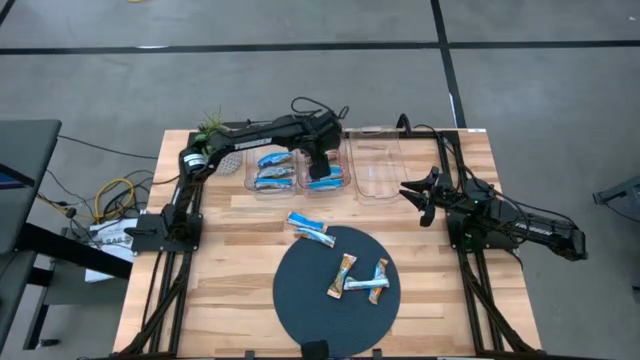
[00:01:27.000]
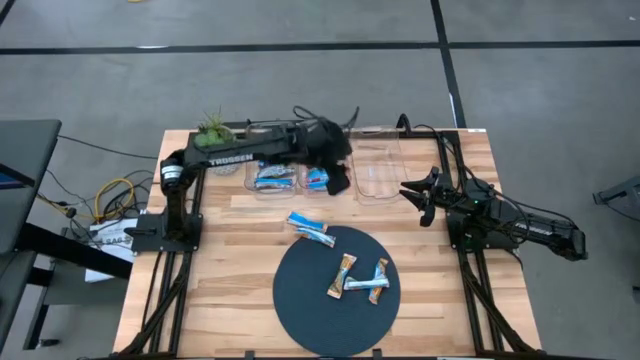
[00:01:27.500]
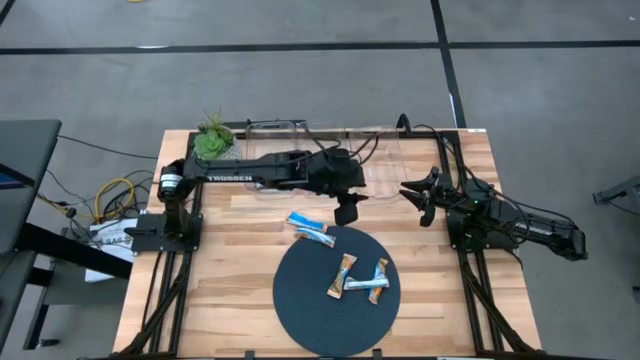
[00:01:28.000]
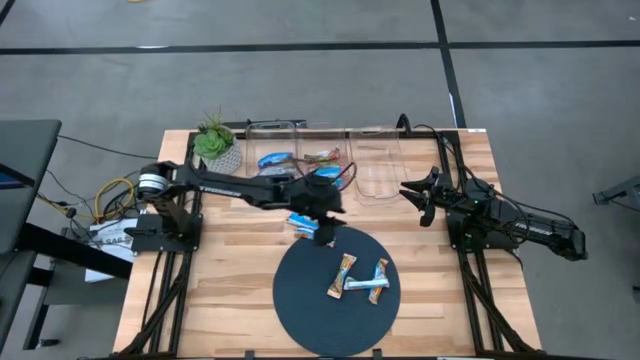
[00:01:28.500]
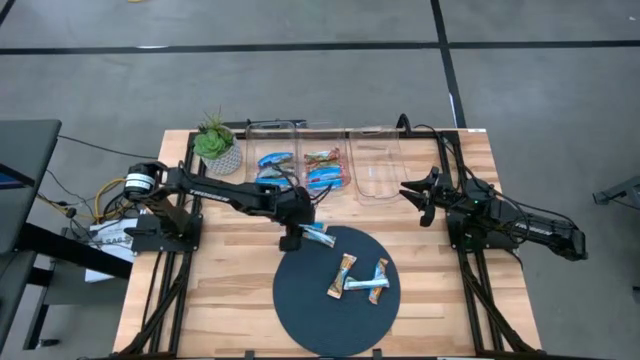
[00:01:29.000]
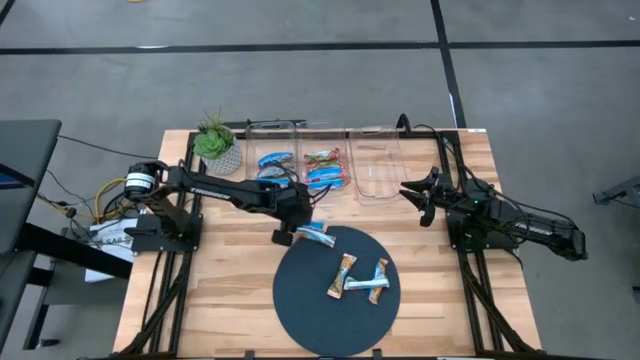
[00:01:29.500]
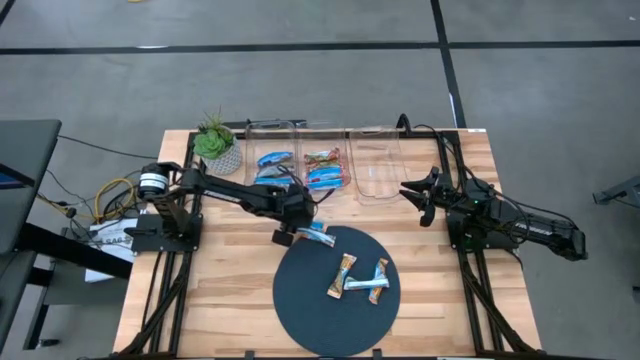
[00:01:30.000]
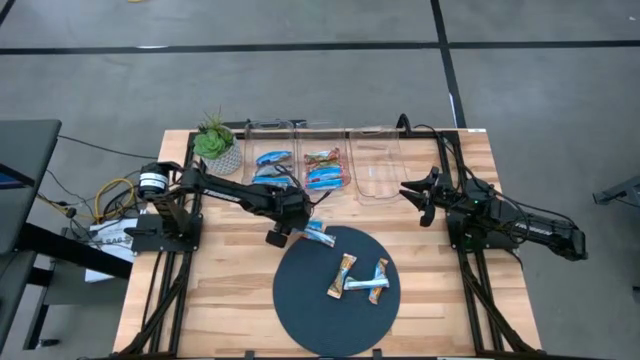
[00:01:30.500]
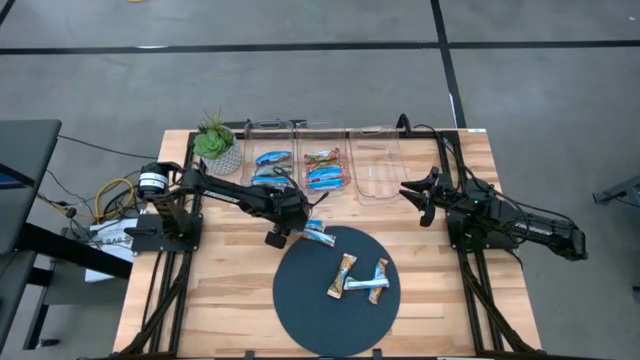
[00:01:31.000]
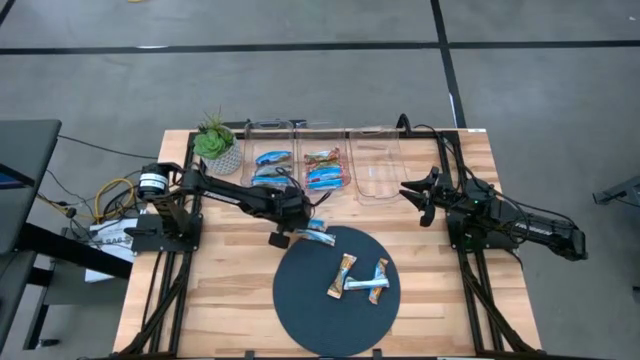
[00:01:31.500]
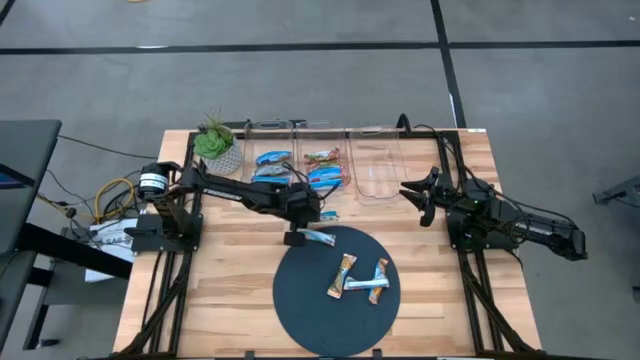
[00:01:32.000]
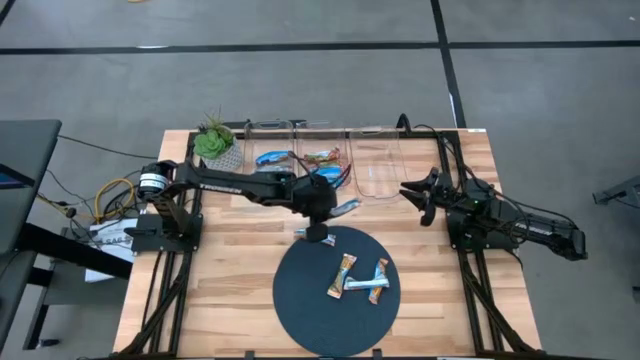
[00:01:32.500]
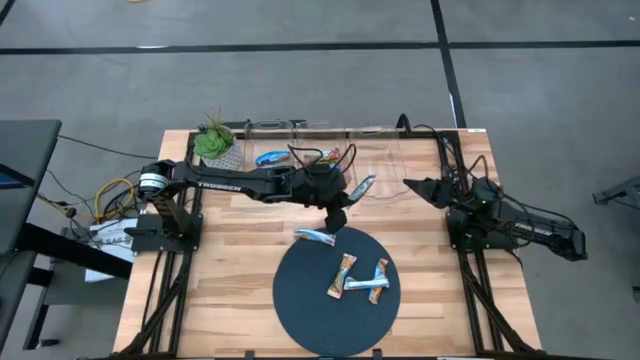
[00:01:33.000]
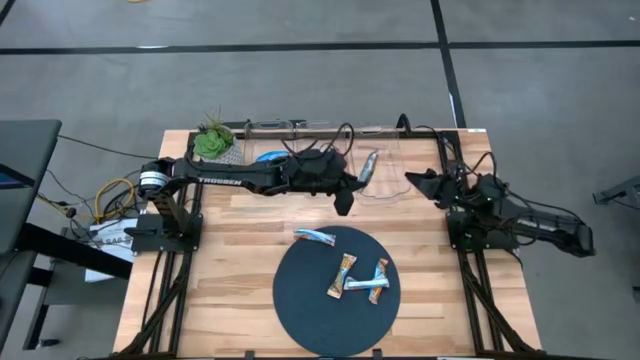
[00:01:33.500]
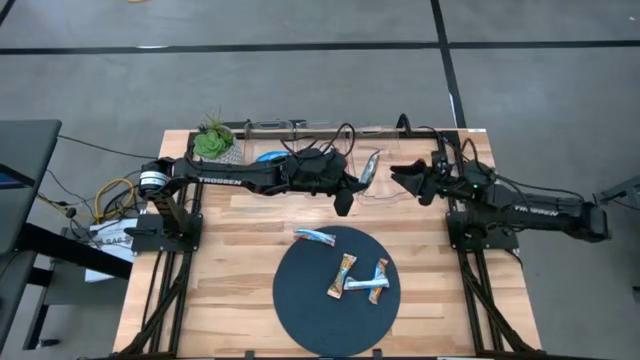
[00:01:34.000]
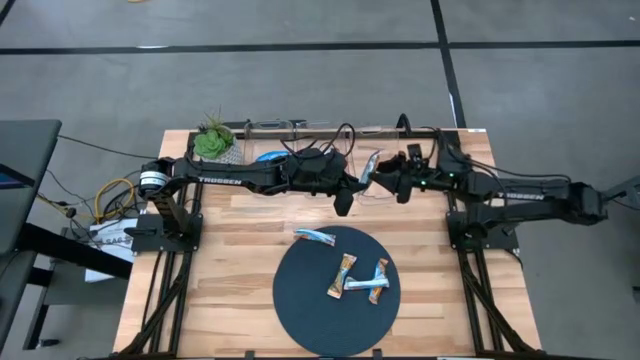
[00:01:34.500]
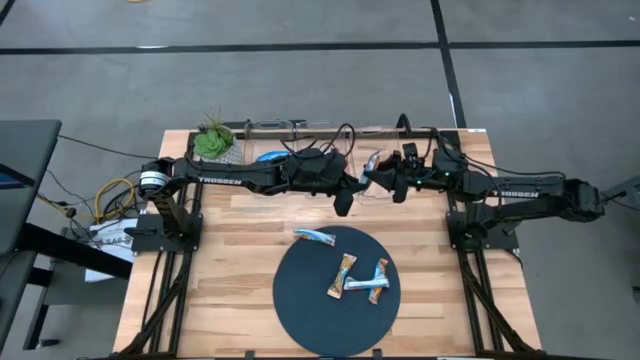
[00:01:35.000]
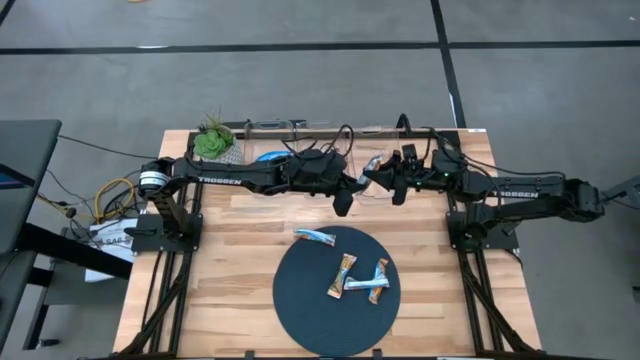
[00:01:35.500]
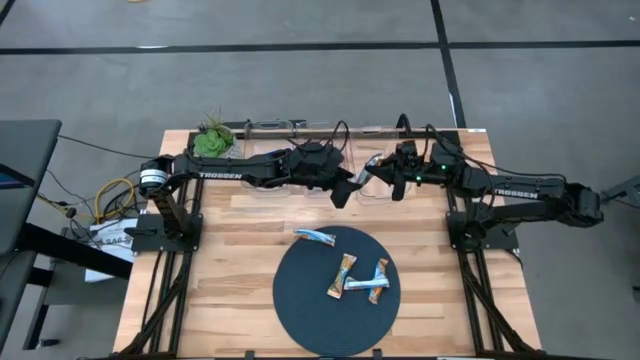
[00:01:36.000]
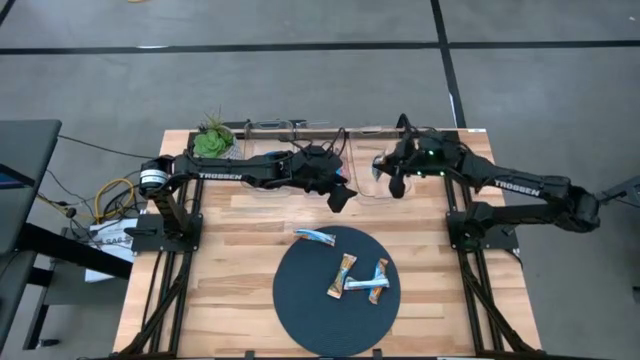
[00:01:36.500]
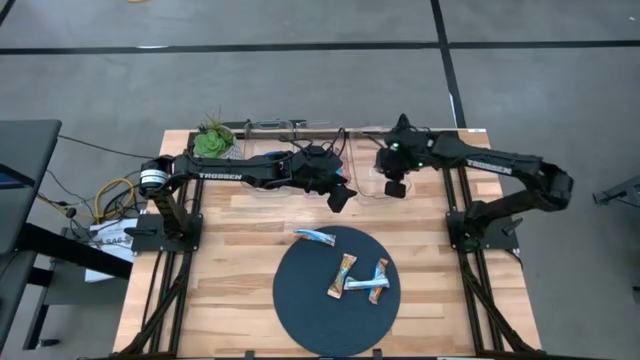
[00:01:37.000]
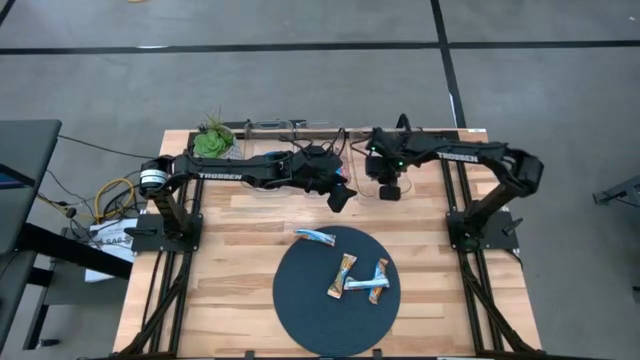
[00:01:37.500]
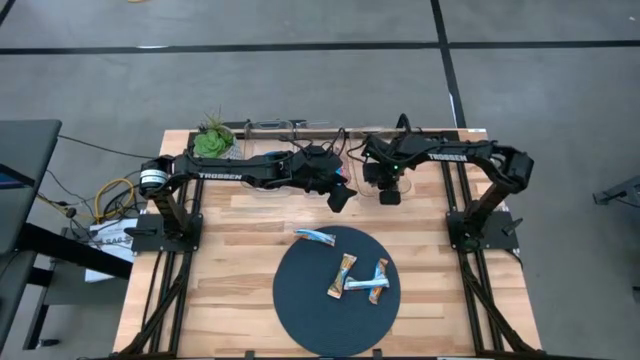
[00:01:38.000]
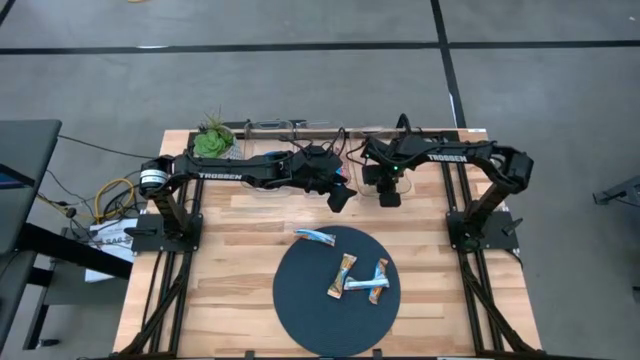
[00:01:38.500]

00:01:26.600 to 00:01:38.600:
Task: Pick and place Granola Bars by type
Put the yellow granola bar into the right transparent bin

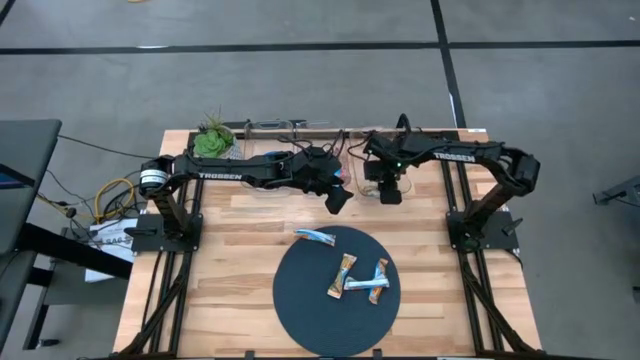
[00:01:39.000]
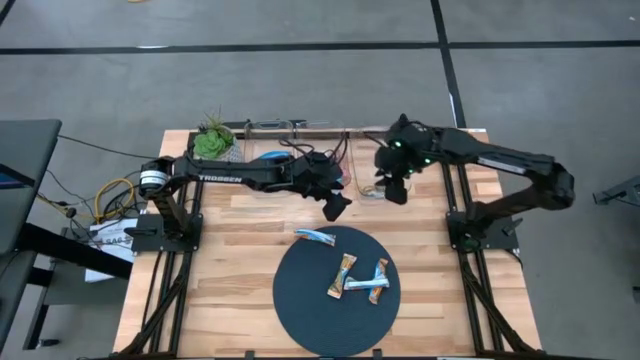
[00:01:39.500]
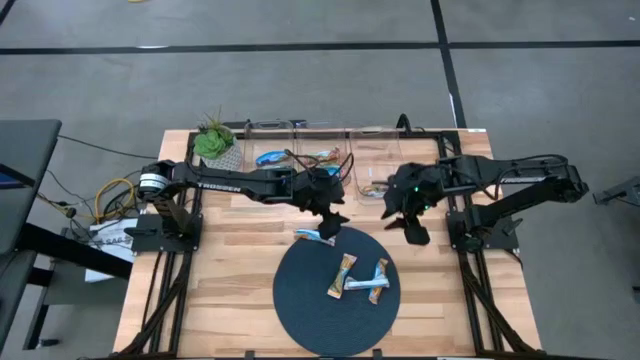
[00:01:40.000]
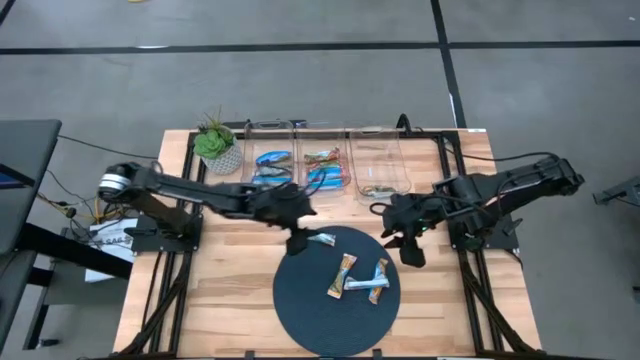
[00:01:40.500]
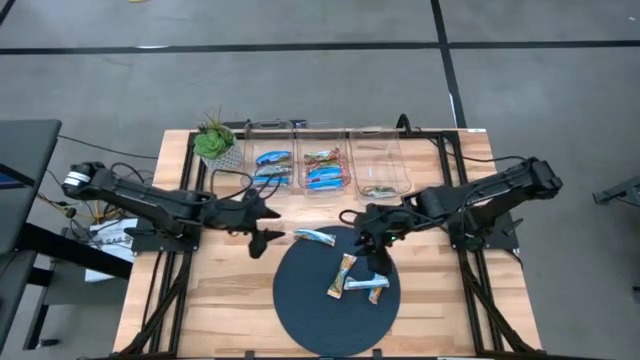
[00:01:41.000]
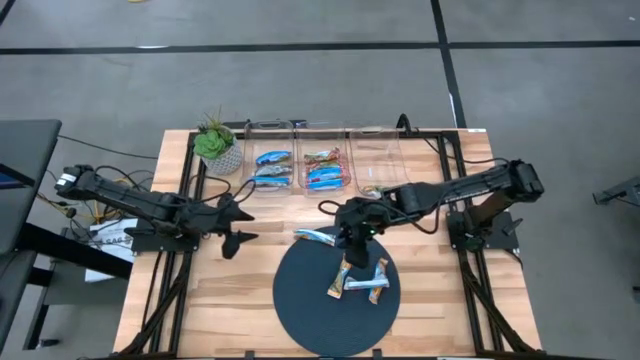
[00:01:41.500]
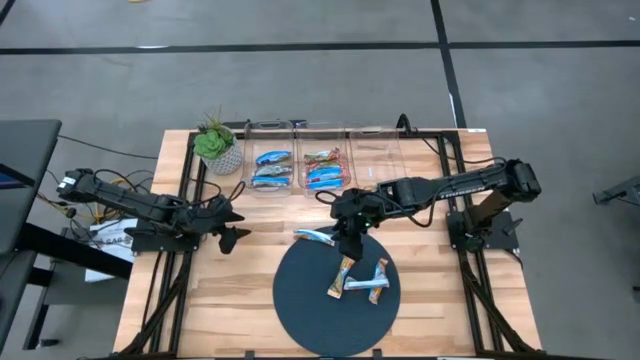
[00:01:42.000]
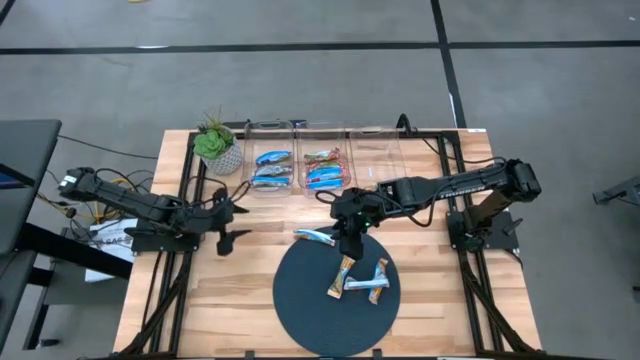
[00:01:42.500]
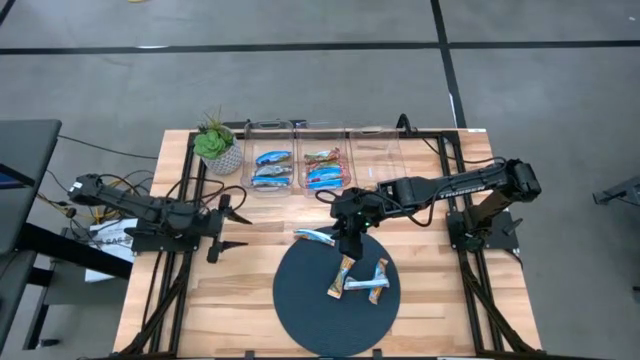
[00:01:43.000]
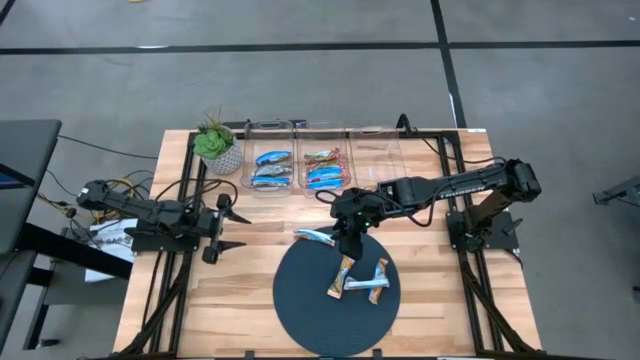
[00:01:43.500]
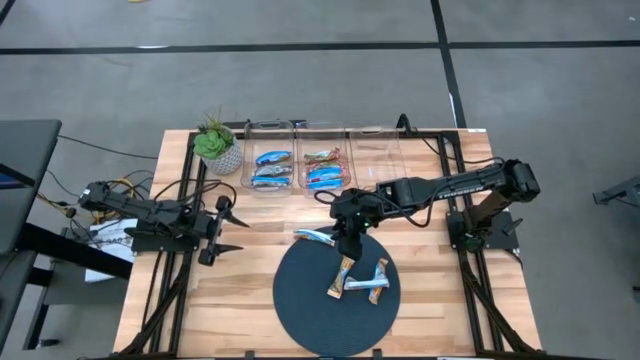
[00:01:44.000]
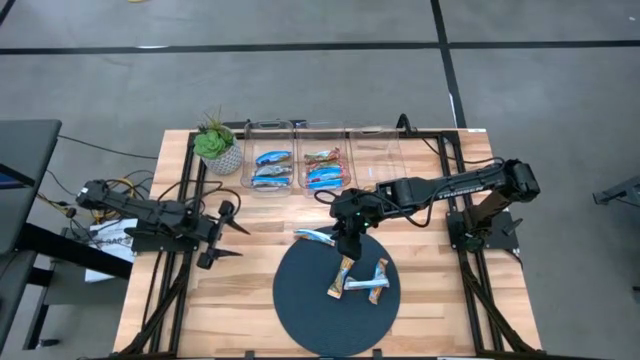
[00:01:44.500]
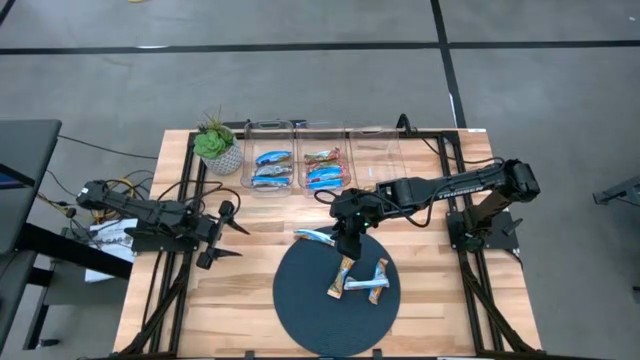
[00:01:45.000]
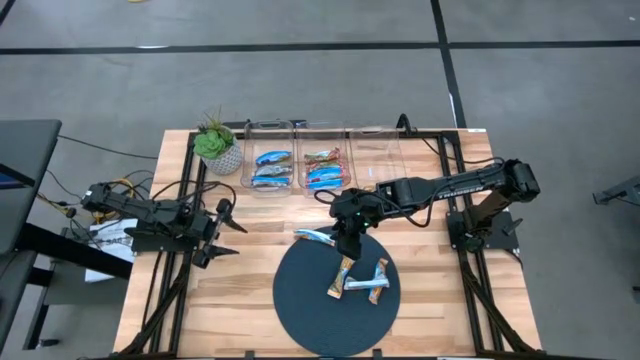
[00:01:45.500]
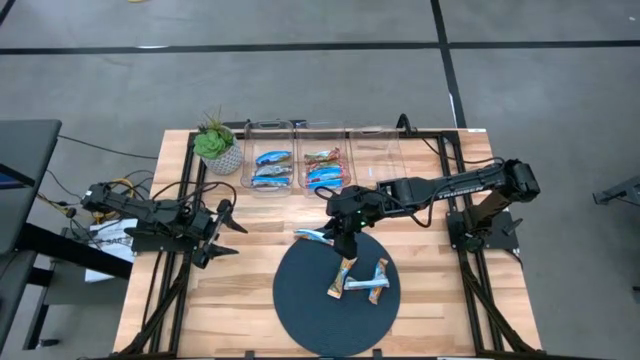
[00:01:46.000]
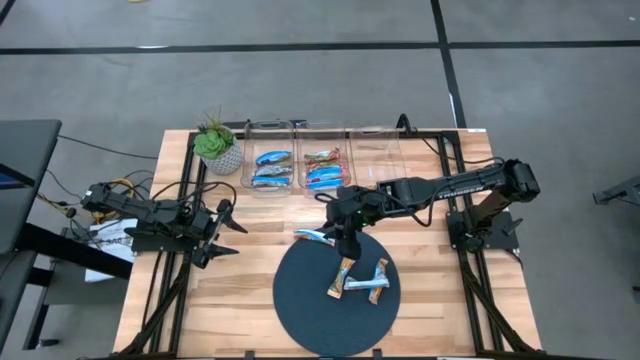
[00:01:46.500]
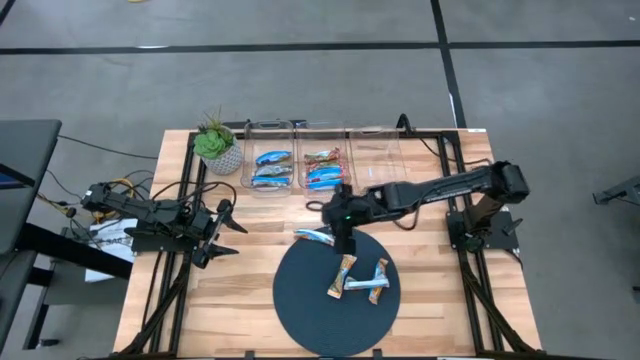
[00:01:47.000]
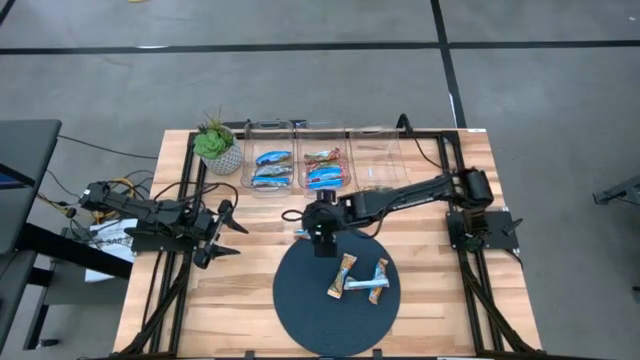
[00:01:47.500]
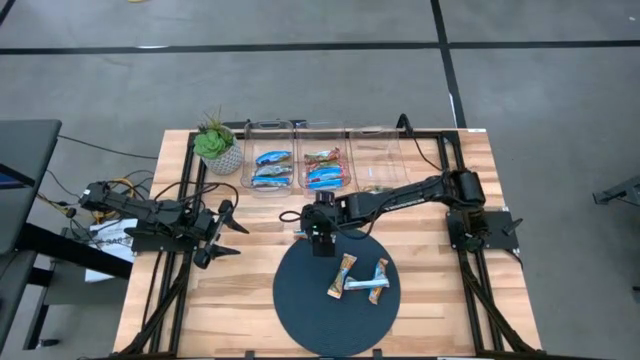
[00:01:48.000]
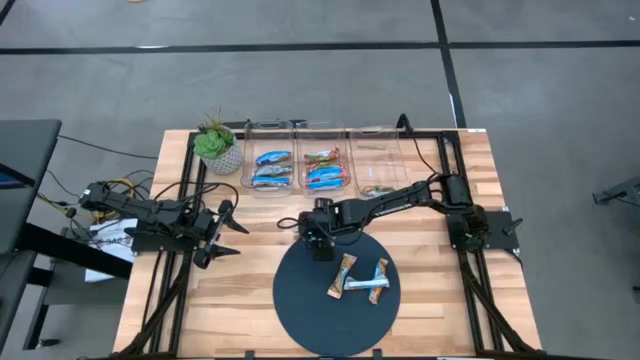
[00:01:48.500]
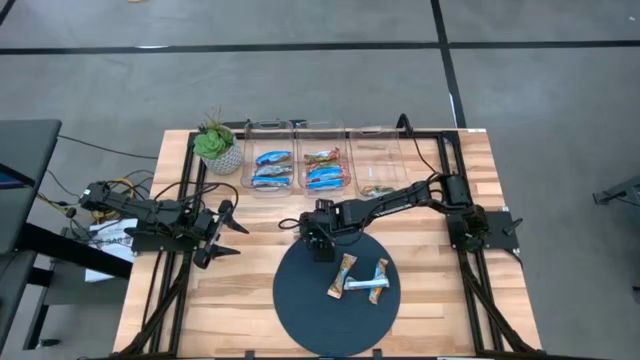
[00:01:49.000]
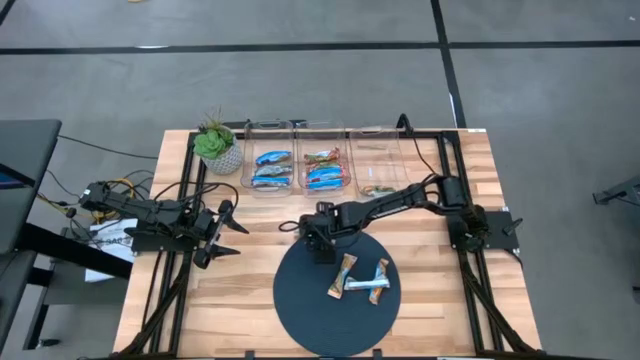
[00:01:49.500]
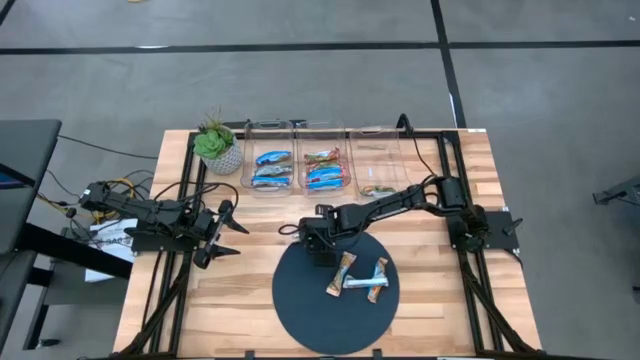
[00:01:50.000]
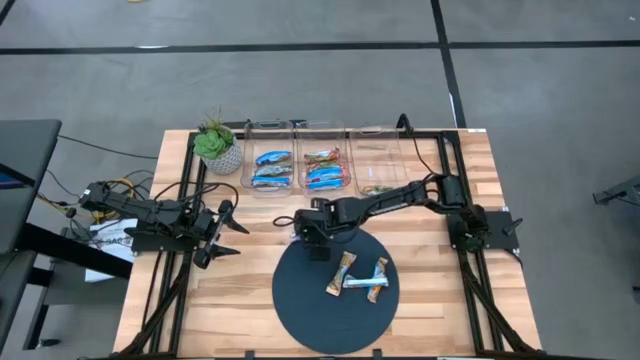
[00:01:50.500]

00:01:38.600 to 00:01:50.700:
Put the yellow granola bar into the right transparent bin
